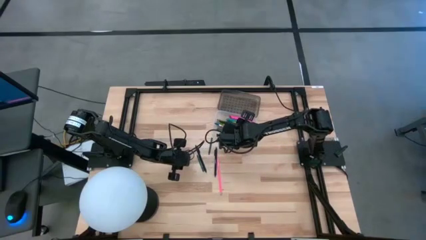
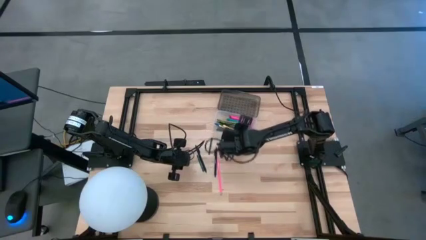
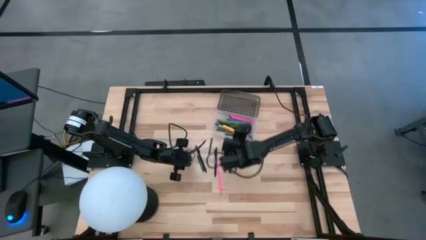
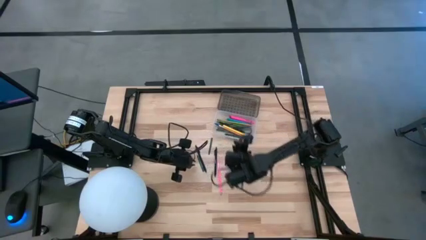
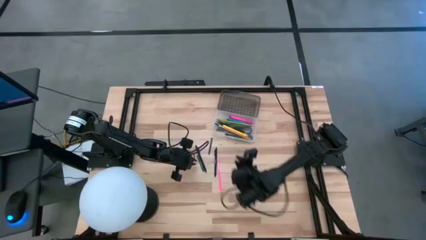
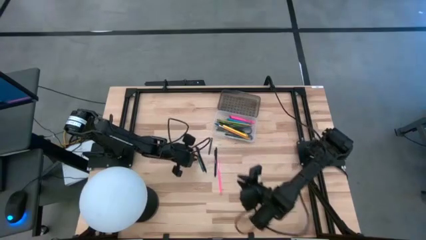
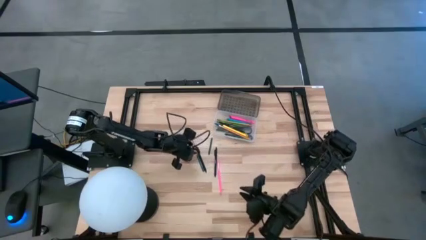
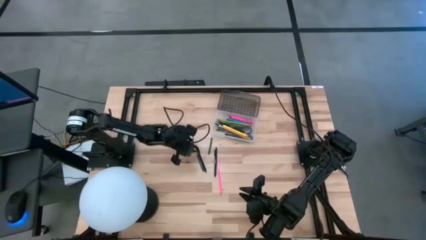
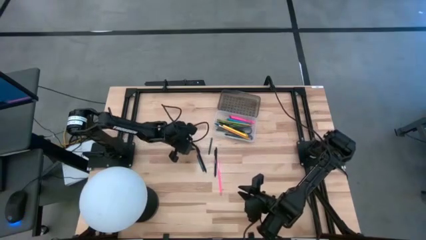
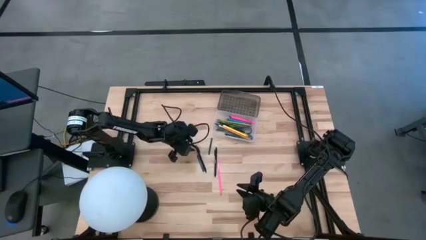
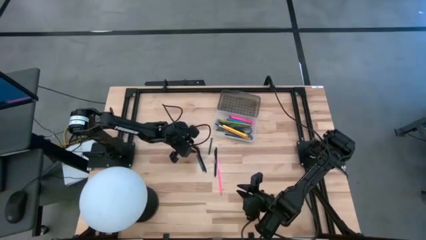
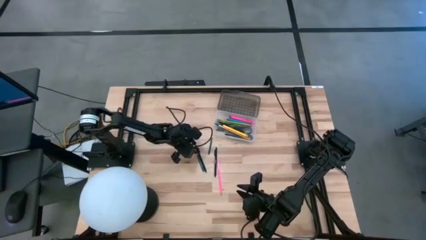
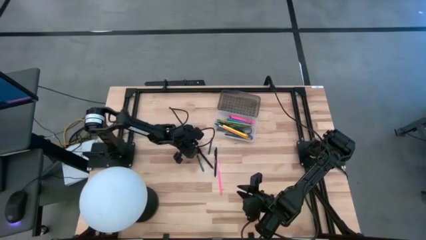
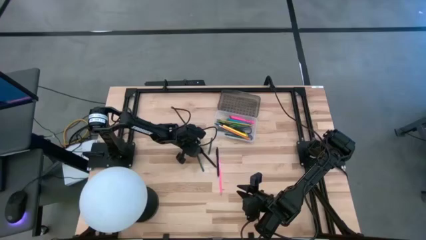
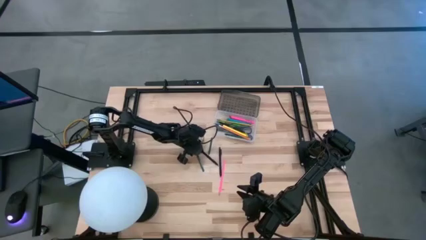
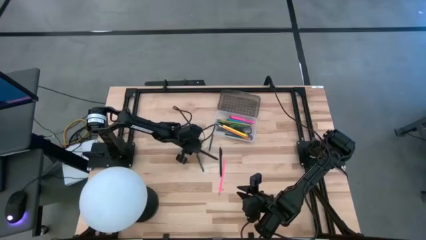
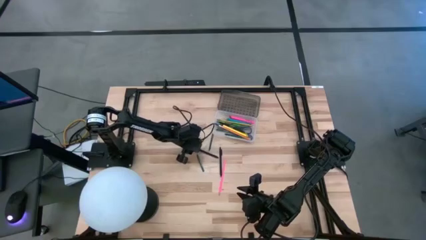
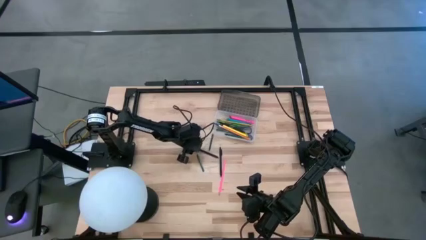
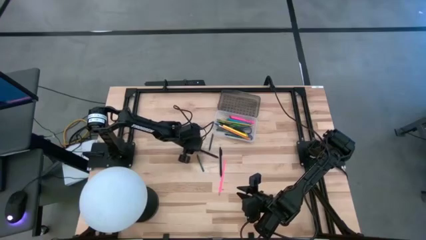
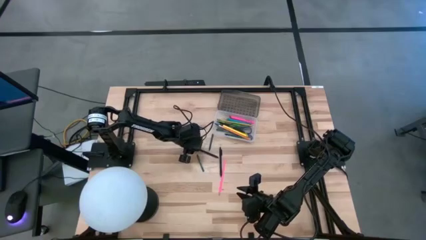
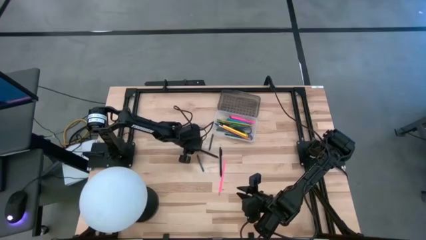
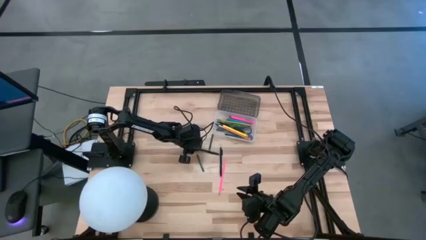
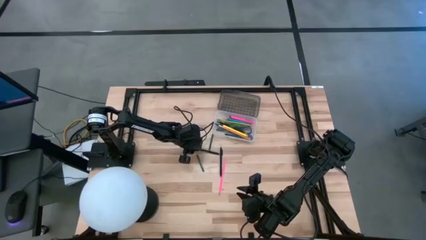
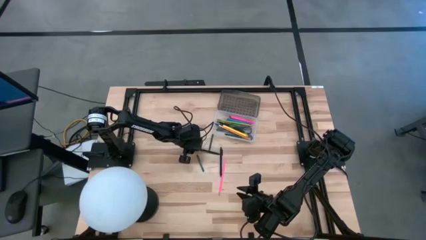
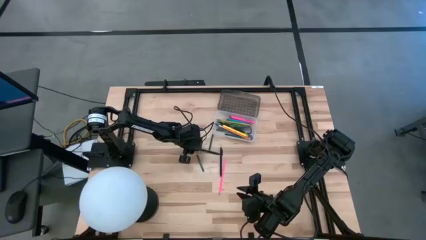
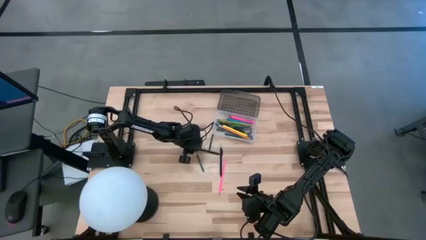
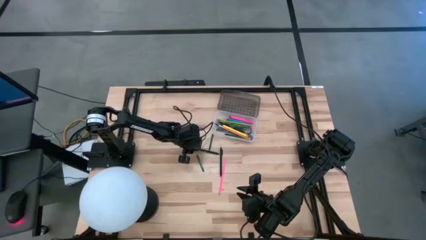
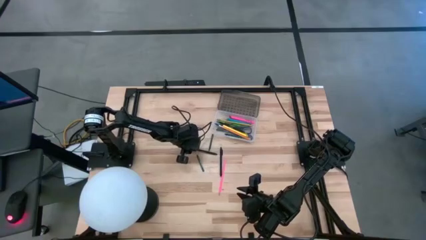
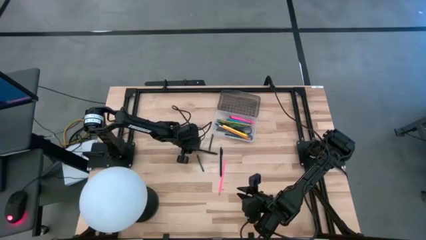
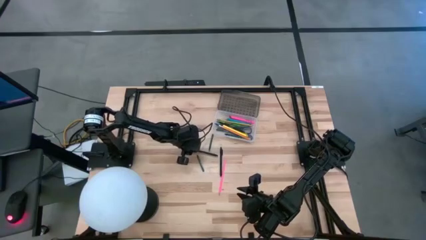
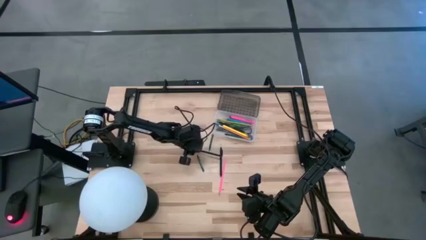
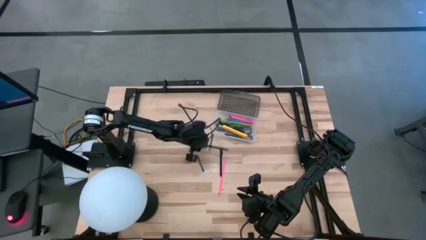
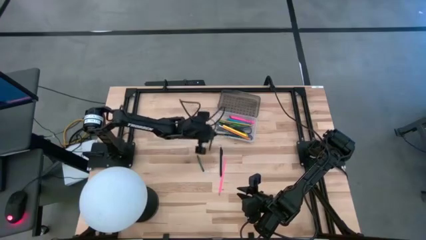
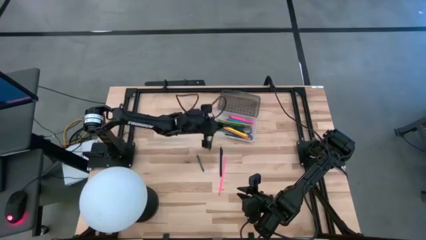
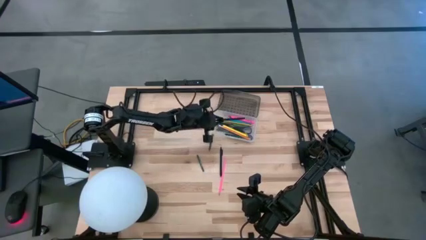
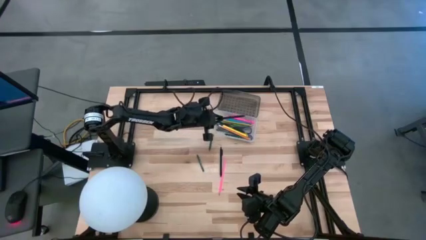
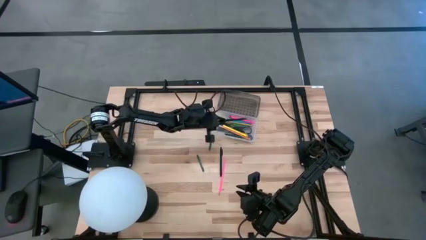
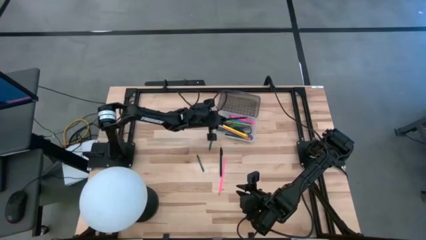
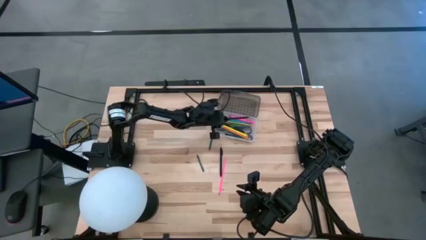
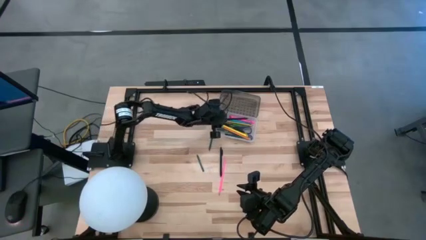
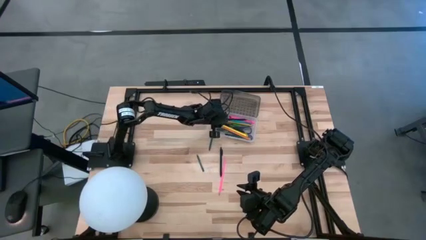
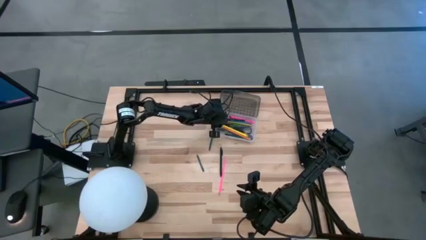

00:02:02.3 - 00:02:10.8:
Task: Pick & place school supplies into a supply box
Put the left black pen into the black supply box

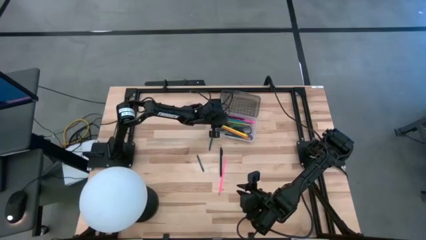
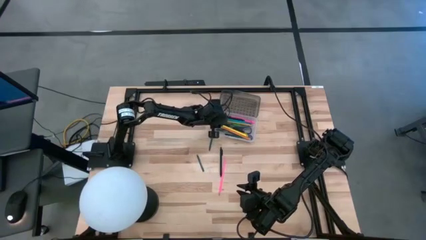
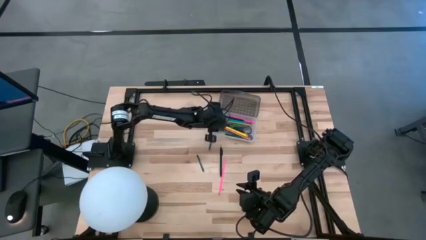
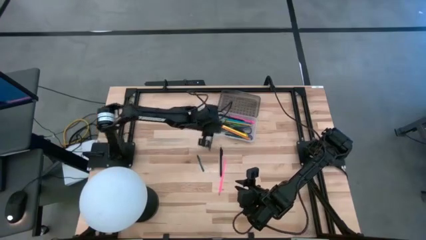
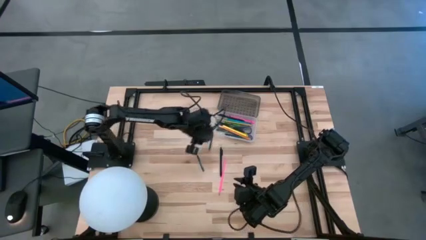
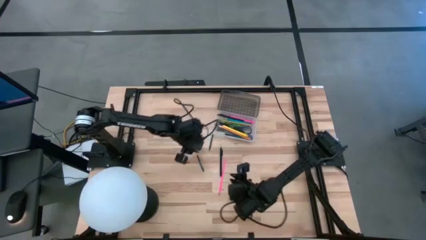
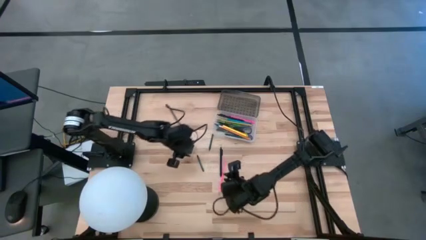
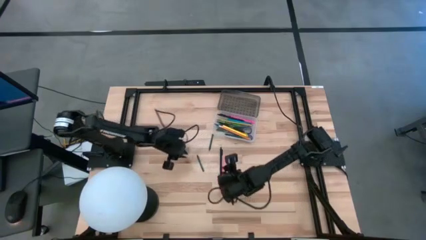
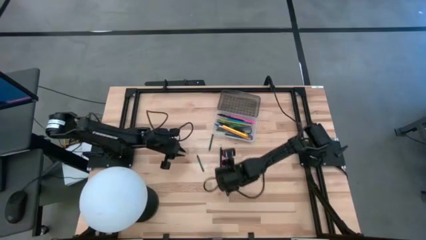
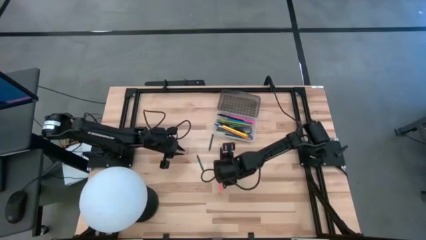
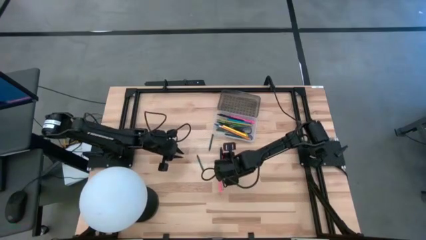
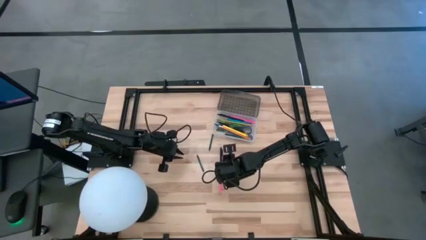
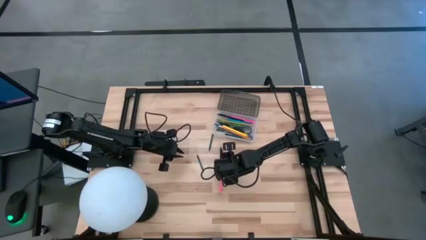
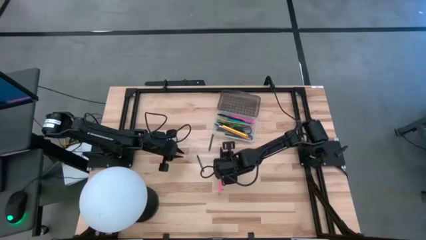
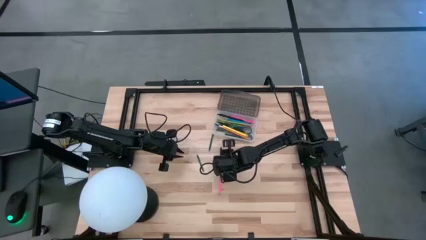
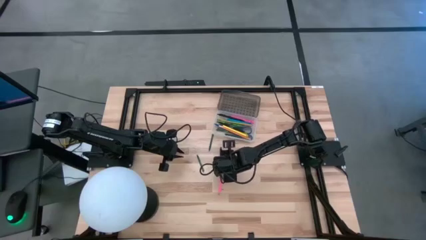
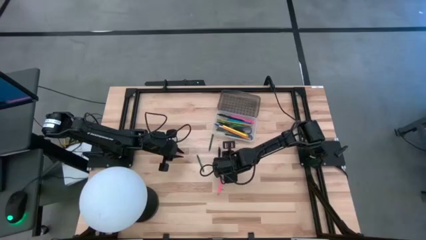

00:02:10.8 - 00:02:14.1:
Adjust the black pen

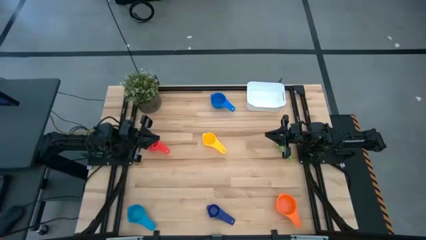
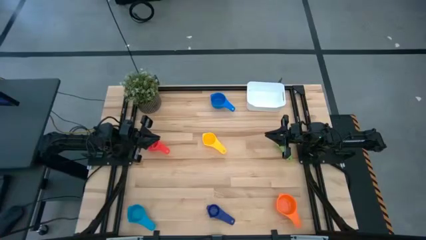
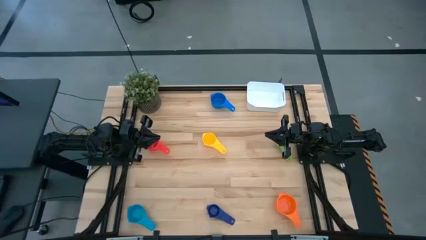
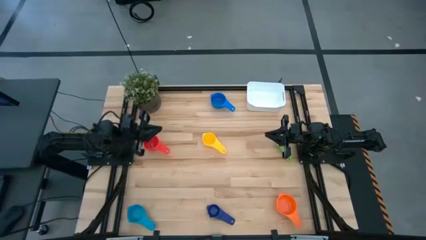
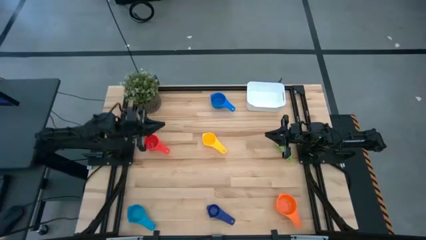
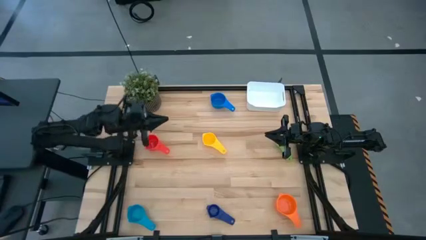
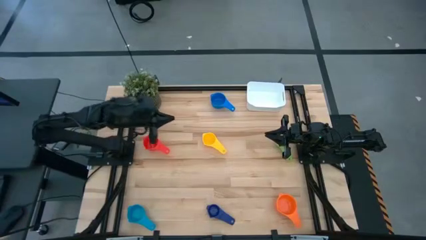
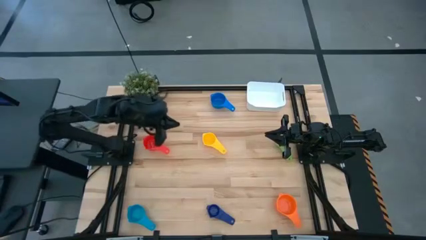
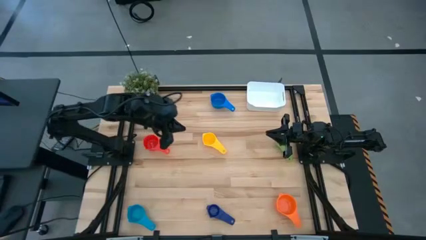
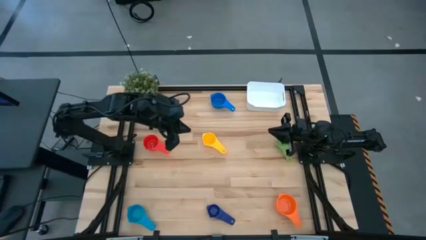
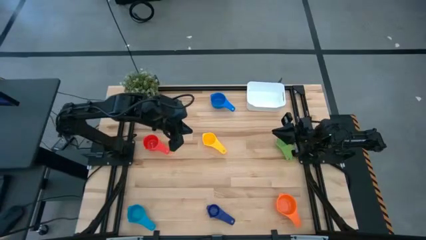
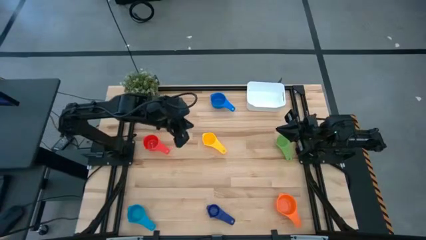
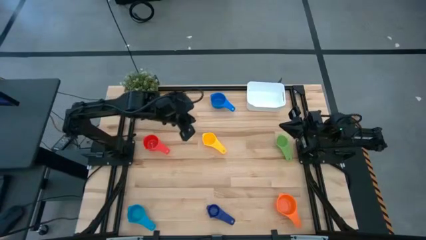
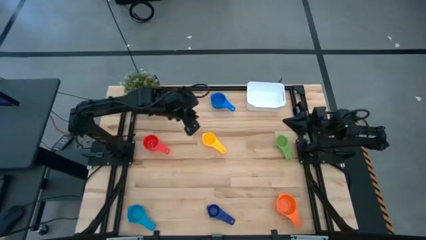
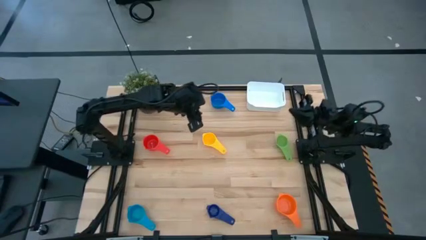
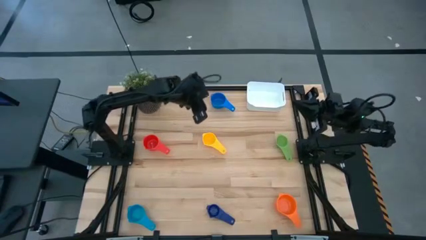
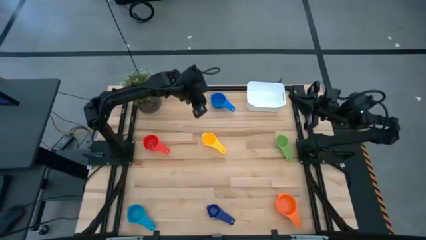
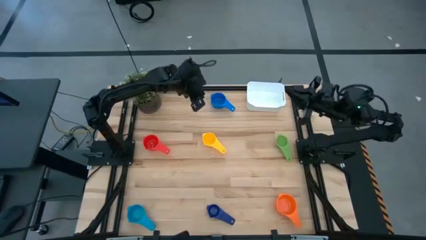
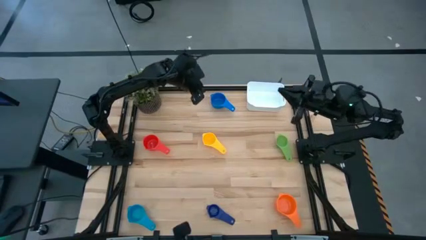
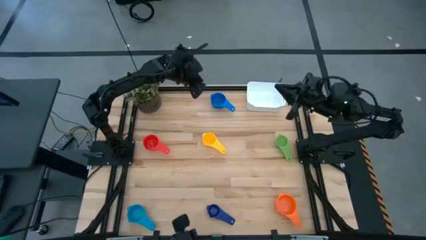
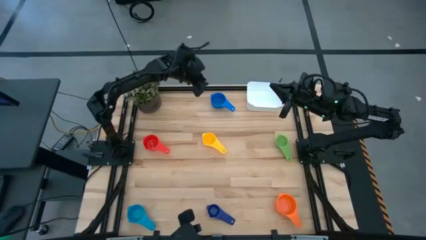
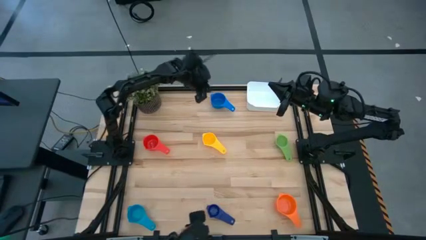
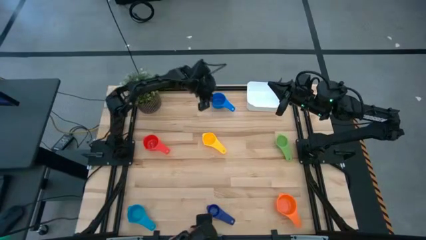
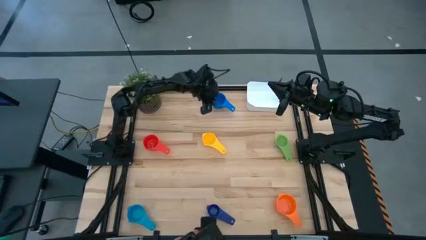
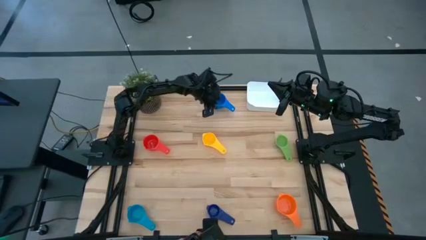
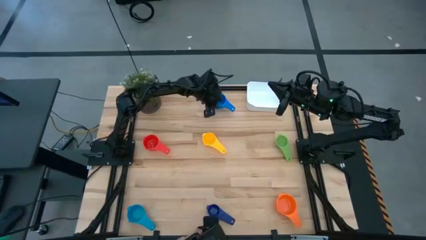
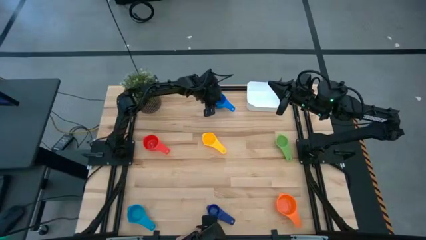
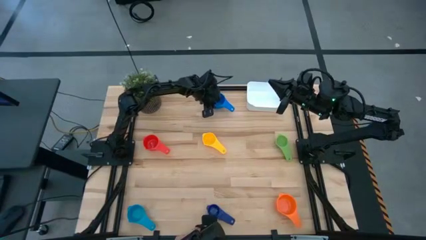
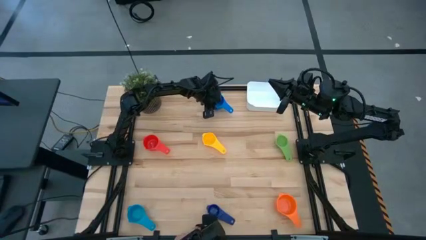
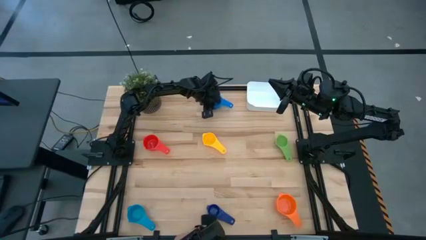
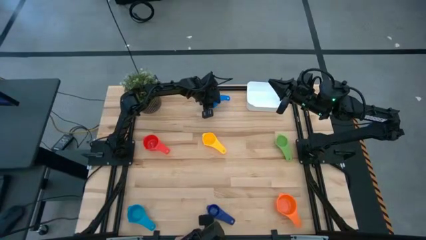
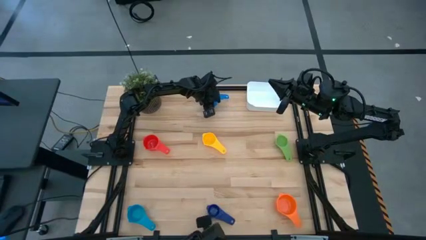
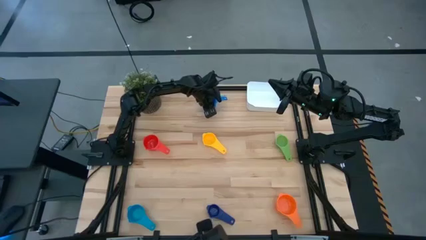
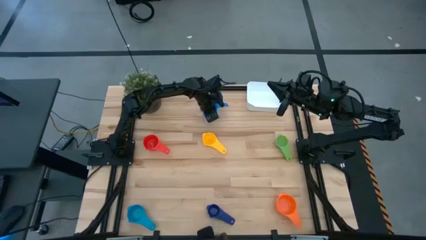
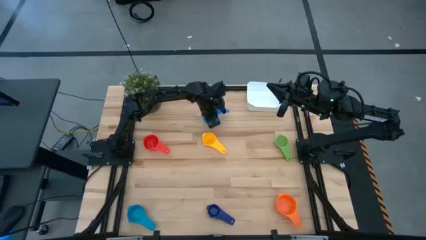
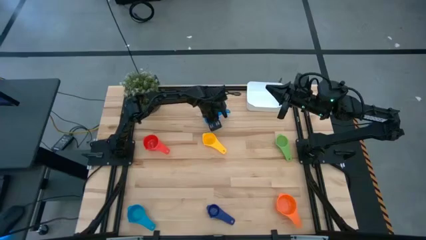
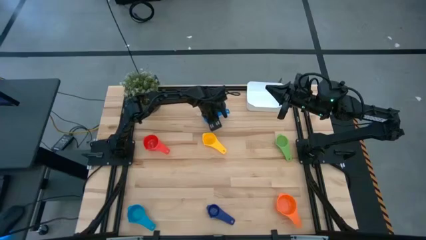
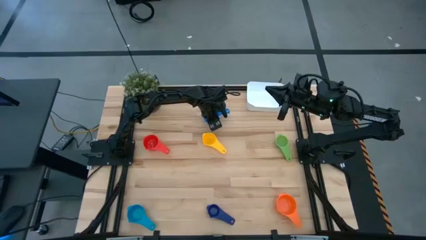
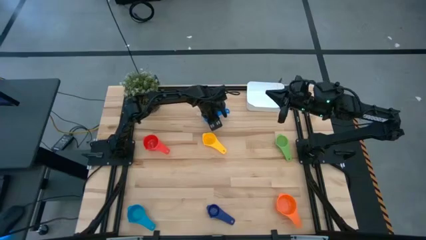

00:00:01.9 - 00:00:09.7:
Task: Nest measuring cups in basket
Adjust the blue measuring cup
